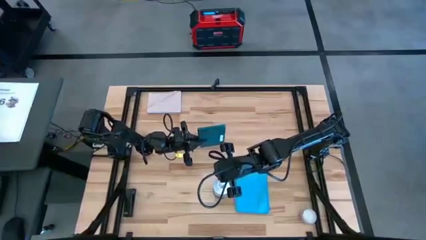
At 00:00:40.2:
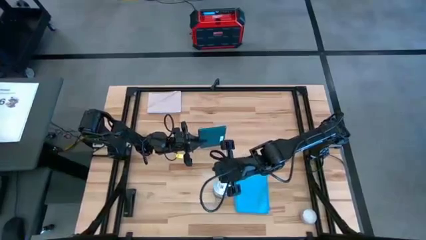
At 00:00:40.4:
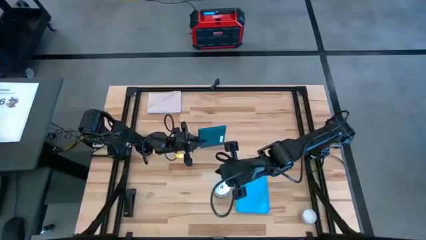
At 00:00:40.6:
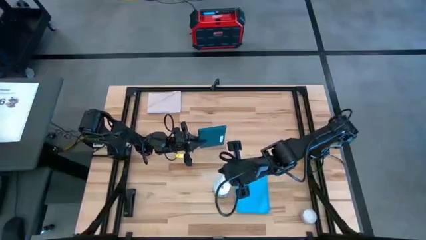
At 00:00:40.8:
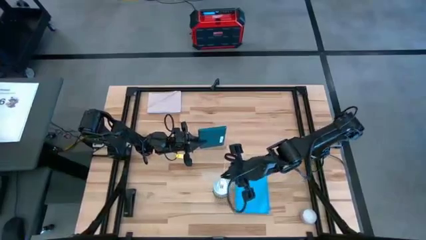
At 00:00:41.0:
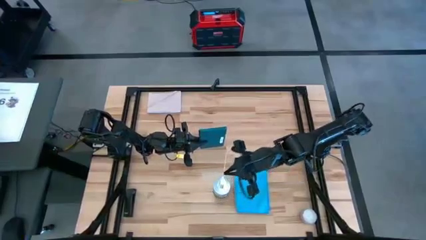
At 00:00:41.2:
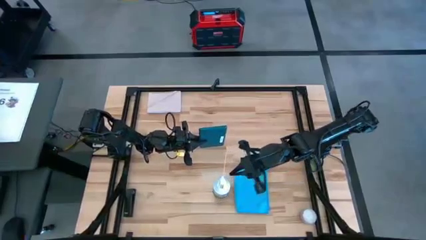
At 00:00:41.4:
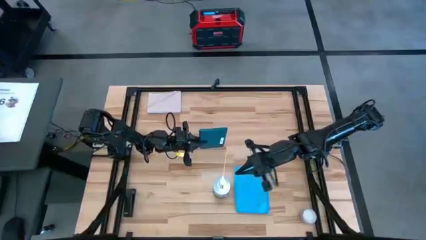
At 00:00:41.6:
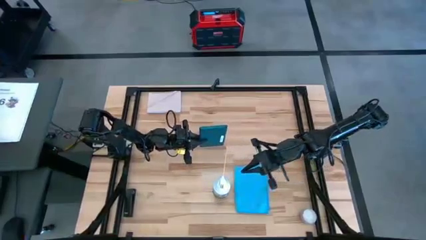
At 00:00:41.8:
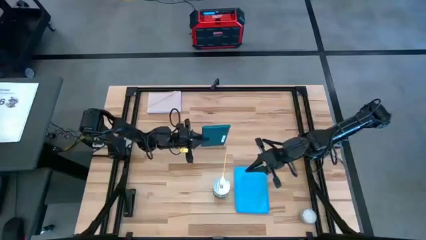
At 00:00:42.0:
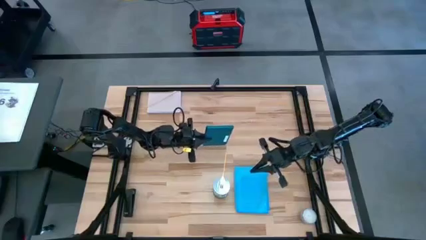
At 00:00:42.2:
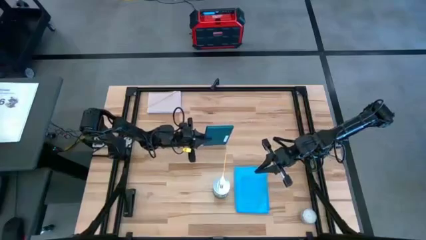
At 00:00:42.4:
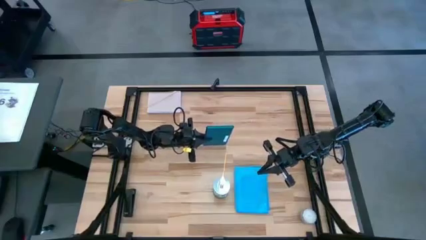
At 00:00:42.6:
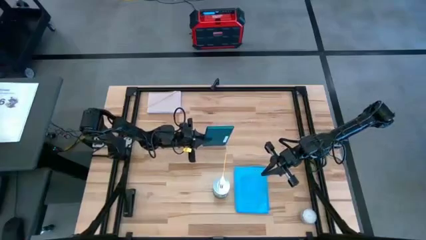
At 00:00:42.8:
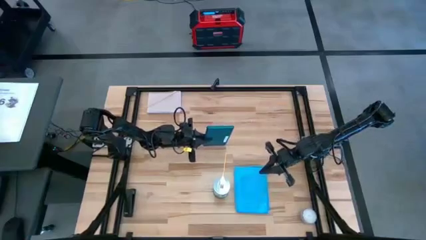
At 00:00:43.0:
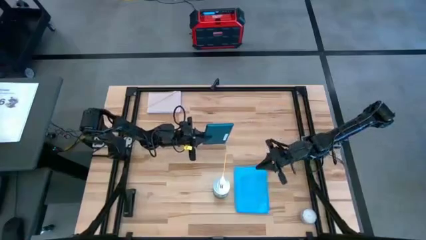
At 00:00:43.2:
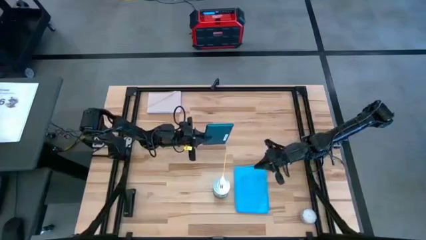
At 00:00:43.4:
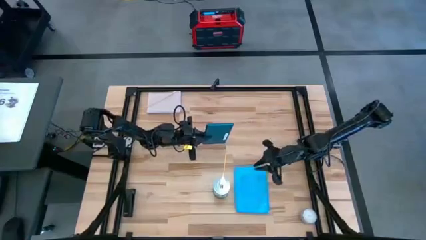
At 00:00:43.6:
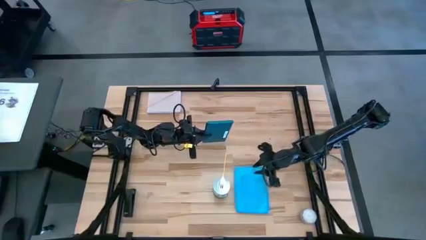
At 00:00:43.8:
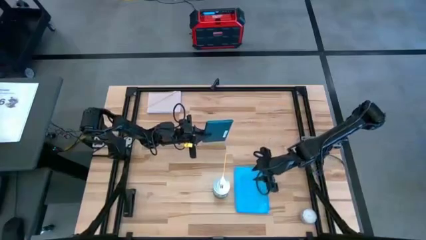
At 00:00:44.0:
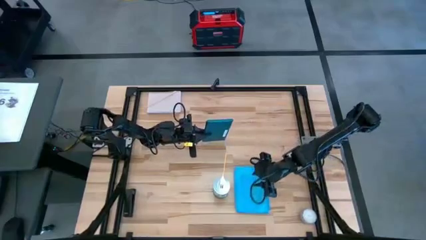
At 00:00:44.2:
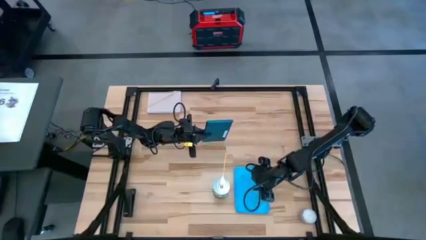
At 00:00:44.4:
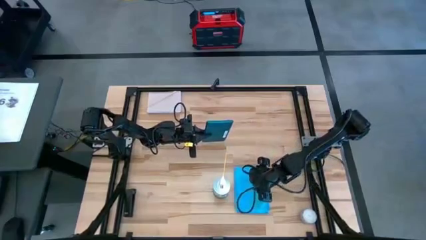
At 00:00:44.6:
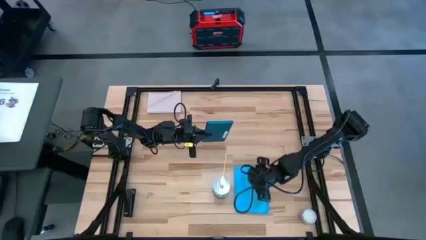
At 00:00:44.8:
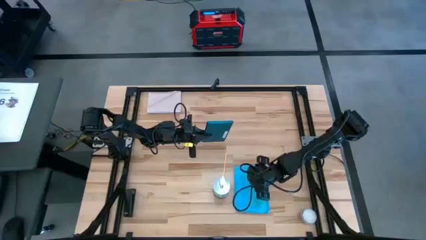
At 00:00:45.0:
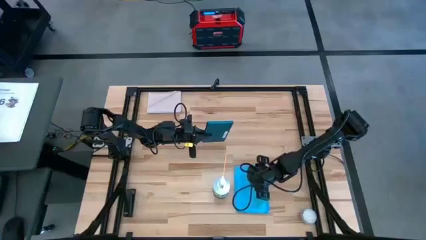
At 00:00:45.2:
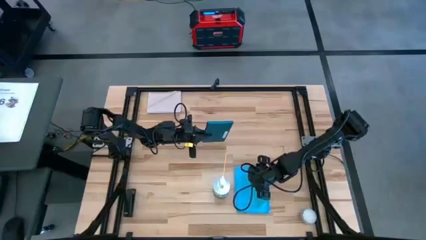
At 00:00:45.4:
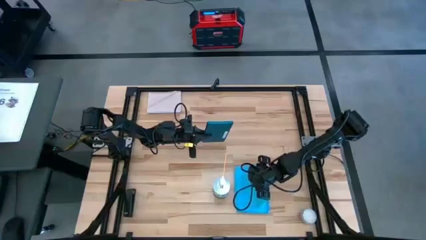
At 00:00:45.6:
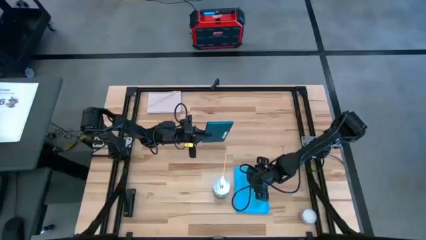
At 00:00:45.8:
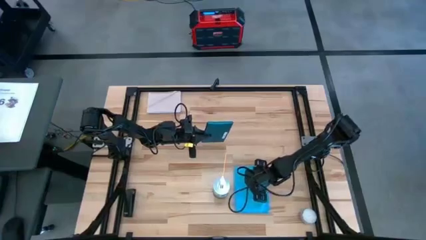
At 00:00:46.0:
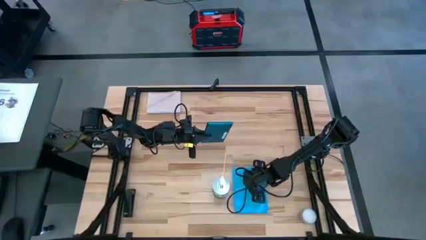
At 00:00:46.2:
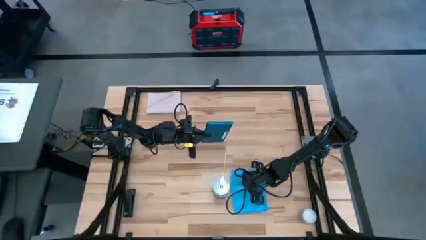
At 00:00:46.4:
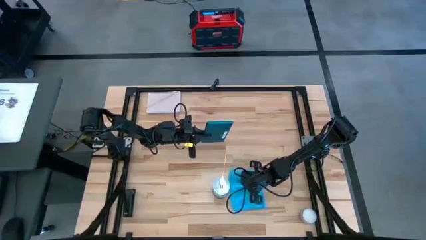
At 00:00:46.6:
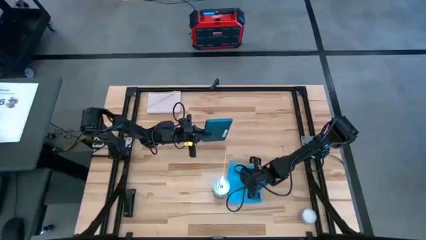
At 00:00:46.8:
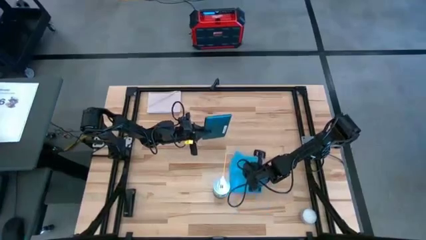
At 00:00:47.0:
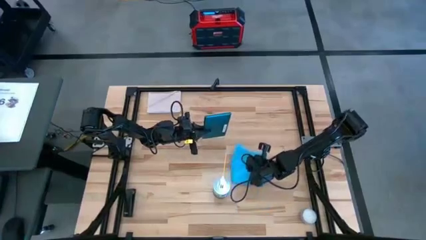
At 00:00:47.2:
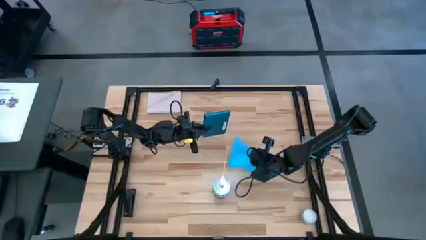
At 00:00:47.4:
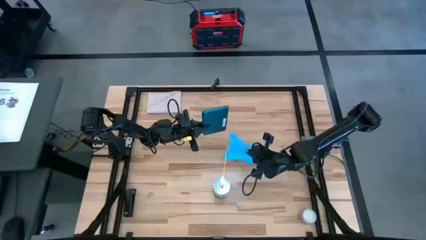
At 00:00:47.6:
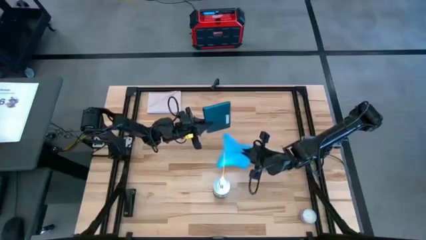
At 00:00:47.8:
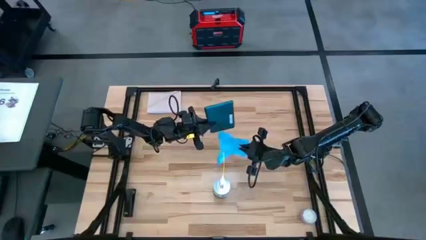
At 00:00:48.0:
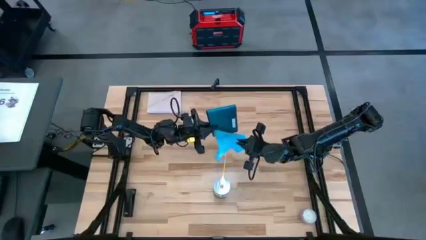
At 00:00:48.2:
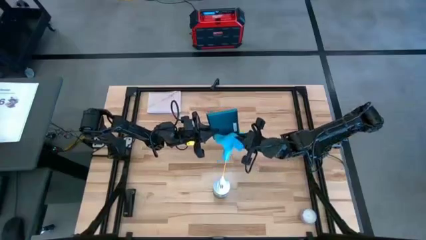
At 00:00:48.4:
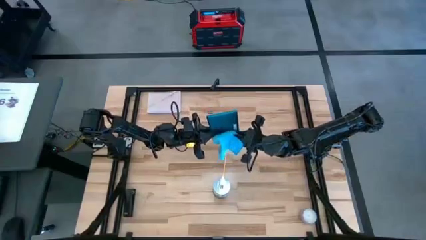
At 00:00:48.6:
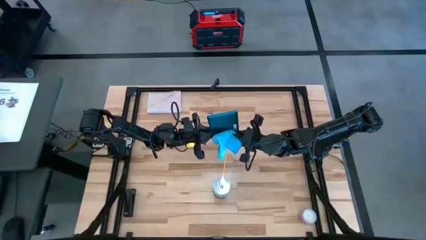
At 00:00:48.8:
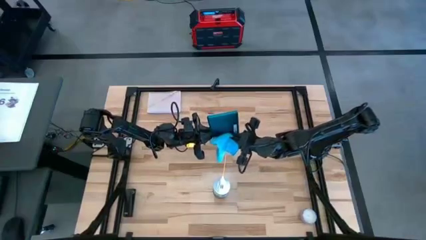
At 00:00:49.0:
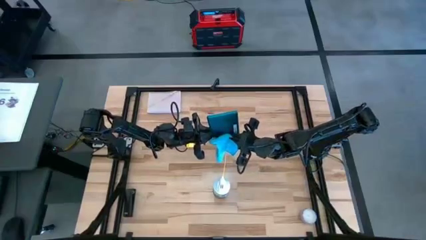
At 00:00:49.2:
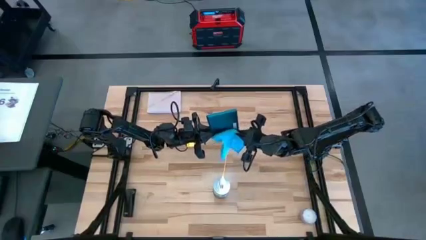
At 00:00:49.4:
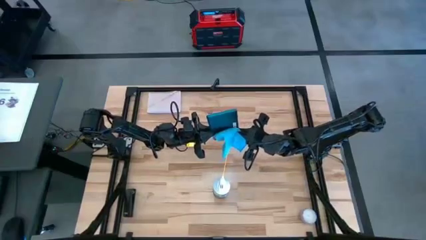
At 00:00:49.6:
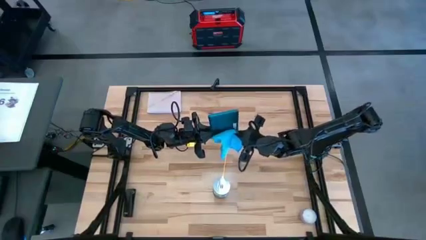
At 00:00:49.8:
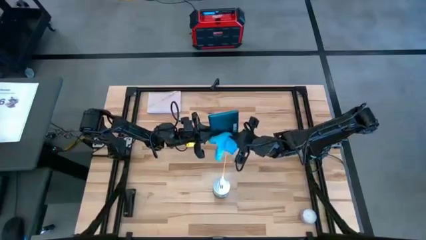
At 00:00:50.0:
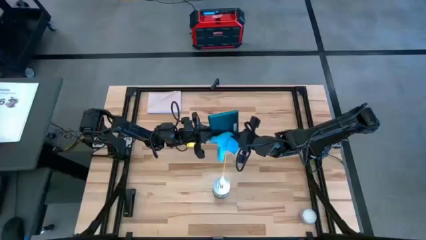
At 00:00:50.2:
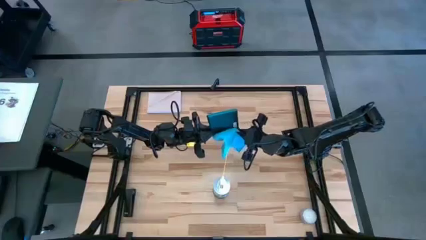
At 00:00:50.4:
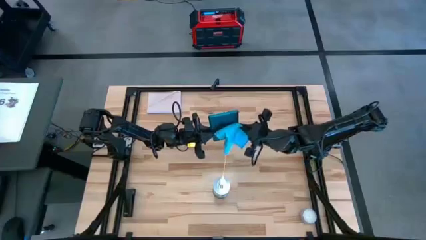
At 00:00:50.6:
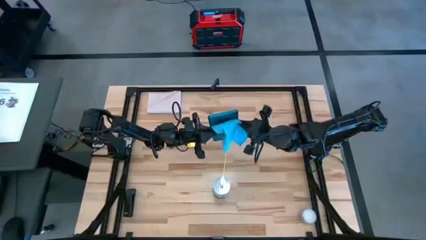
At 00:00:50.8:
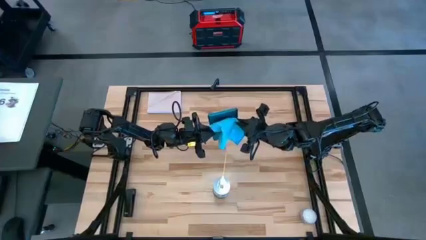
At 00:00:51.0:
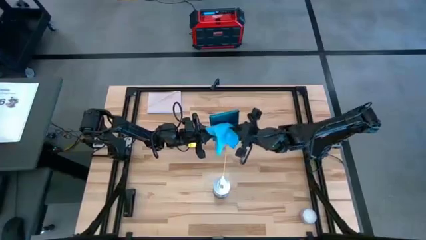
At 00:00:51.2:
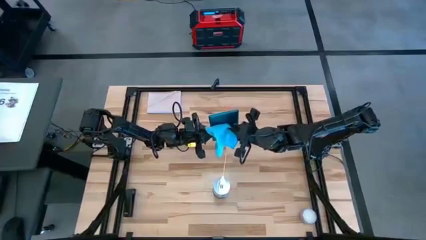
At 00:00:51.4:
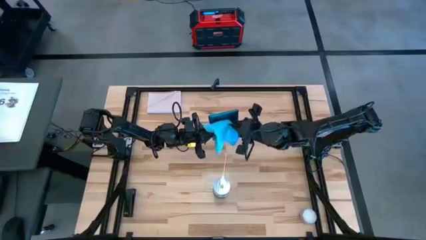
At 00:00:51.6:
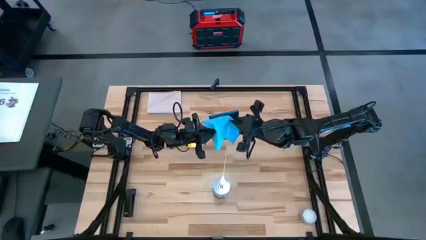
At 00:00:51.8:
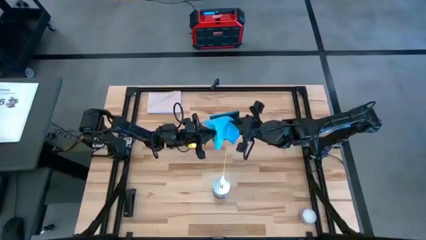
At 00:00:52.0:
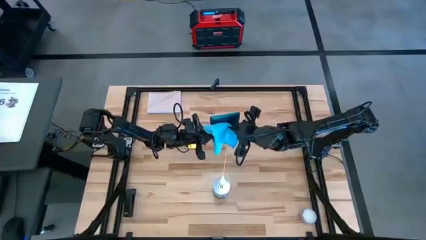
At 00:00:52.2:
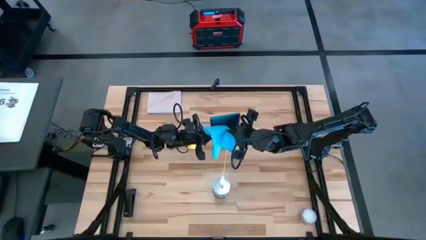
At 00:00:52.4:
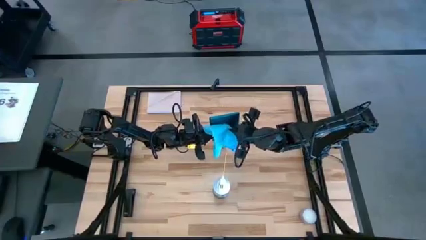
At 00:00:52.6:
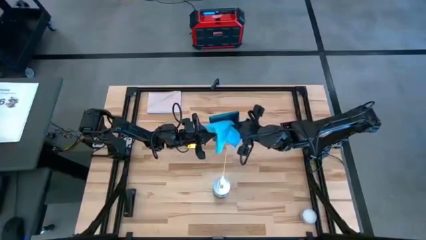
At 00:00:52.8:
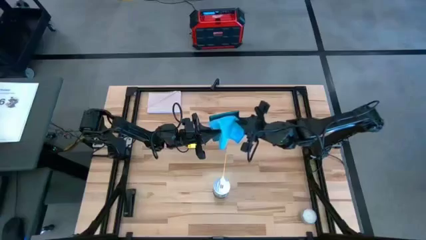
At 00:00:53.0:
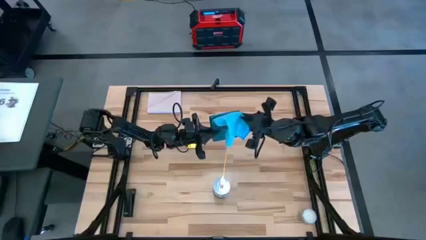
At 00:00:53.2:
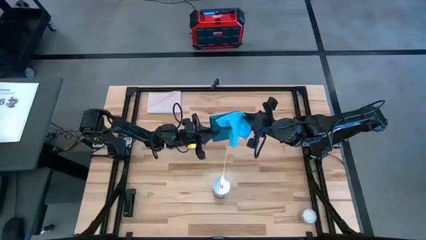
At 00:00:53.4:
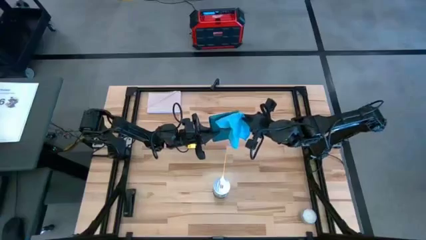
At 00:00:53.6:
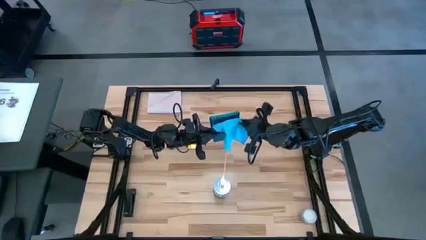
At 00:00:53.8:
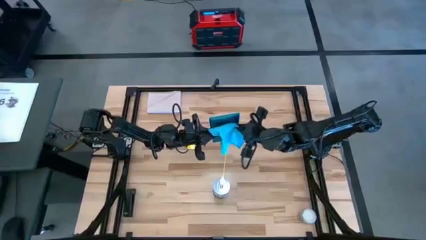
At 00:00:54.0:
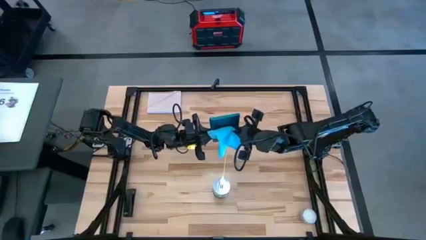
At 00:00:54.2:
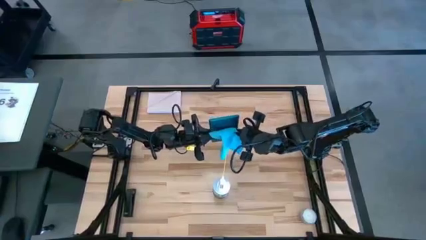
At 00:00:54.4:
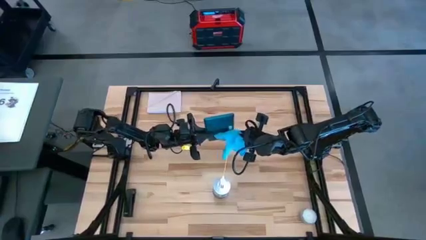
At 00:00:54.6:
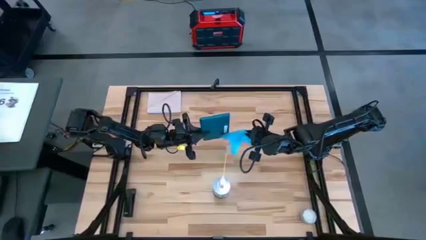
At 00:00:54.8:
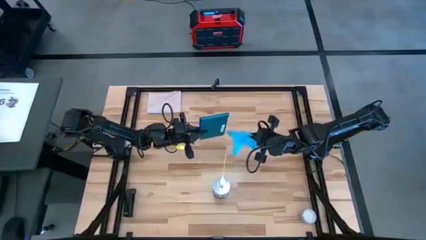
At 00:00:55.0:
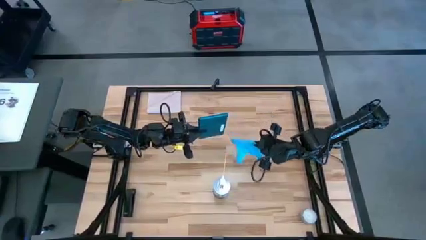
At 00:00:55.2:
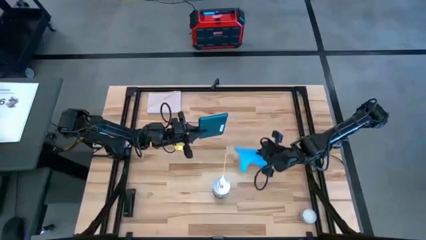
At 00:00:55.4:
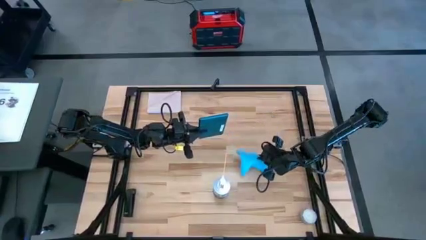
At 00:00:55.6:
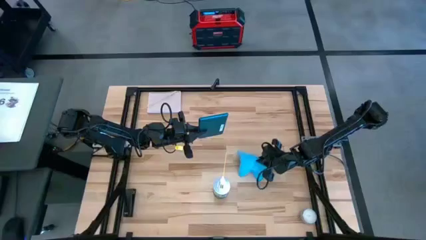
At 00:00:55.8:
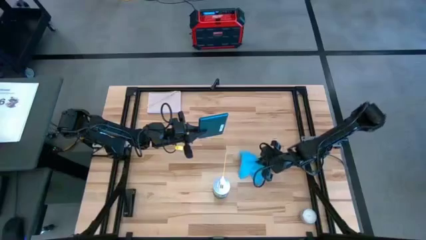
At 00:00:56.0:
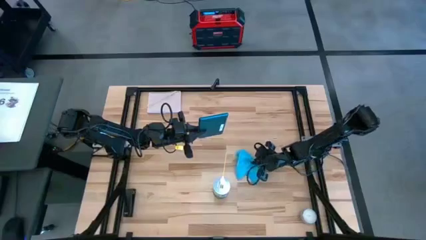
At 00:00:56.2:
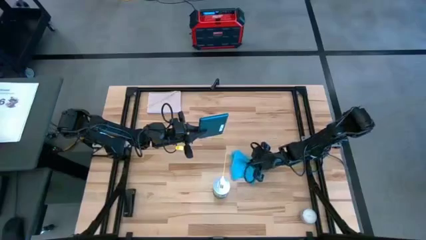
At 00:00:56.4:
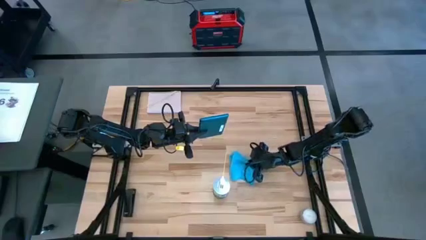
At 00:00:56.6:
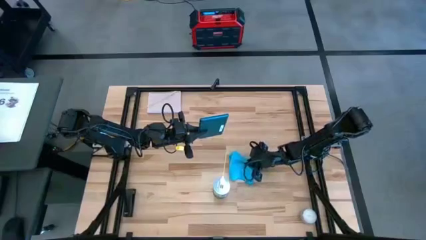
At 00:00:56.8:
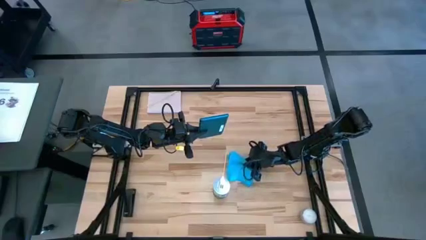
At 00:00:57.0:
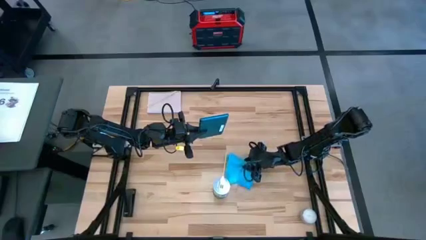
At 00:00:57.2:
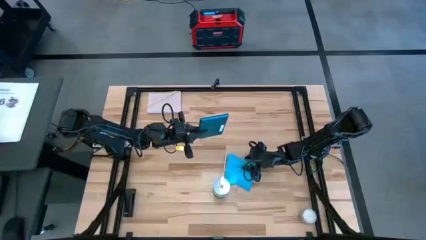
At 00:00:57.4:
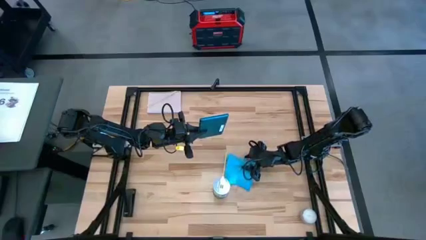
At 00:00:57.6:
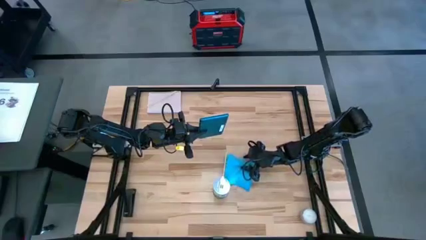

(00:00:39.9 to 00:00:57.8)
Task: Apply microfiber cloth
Wipe the back of the green tablet using the blue microfiber cloth
